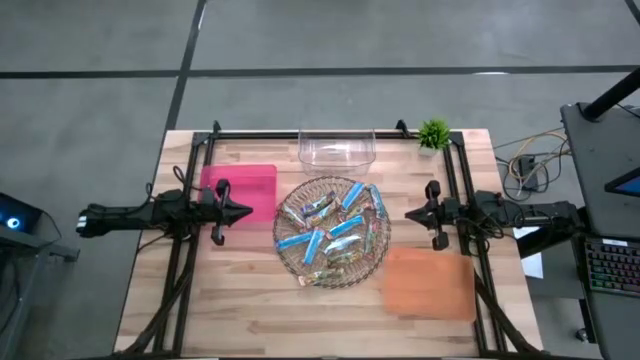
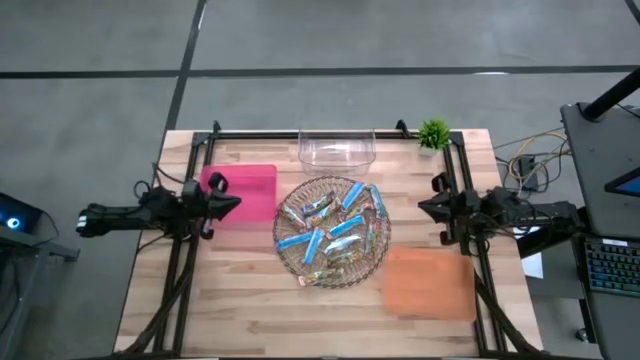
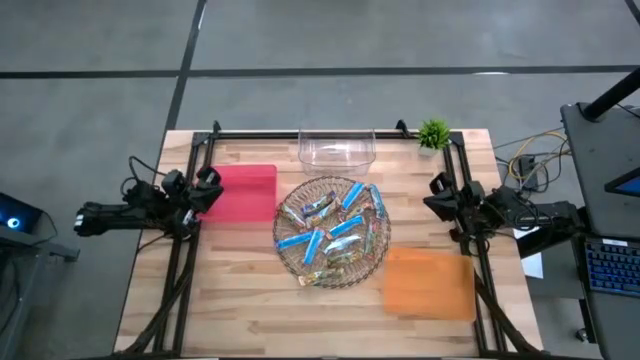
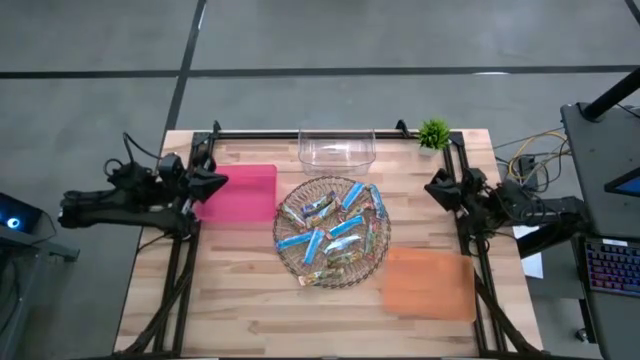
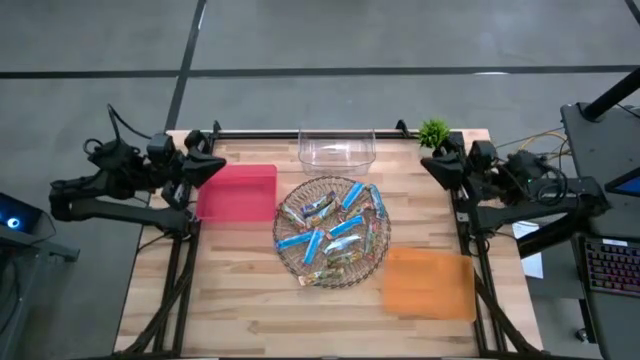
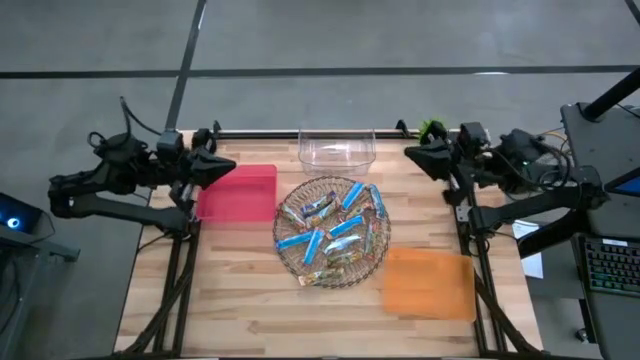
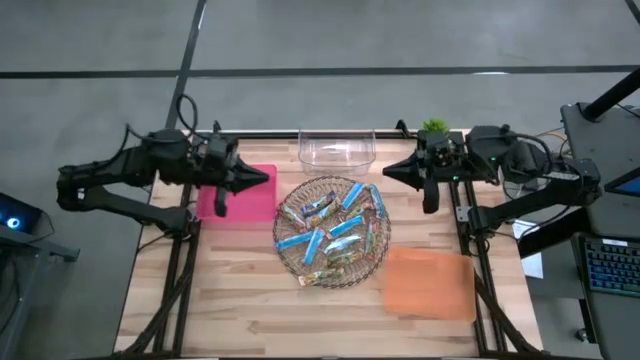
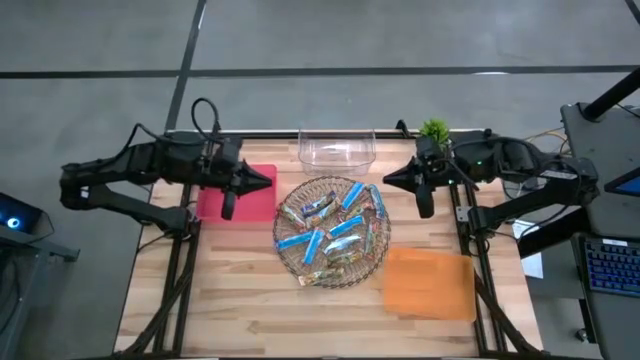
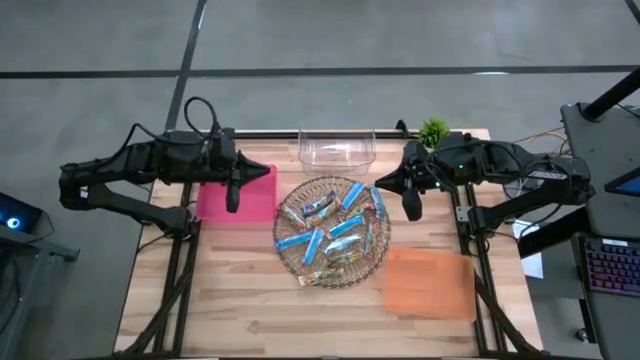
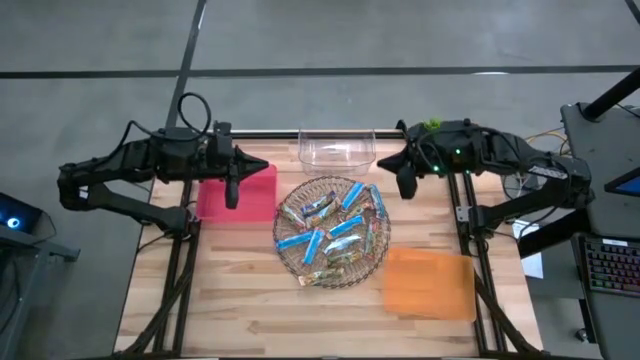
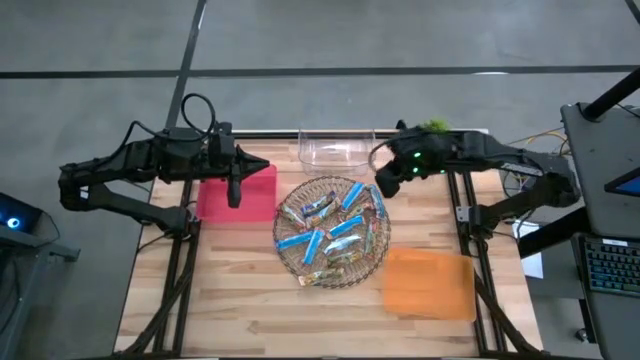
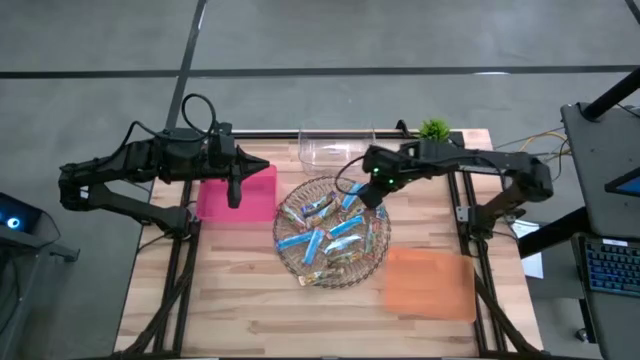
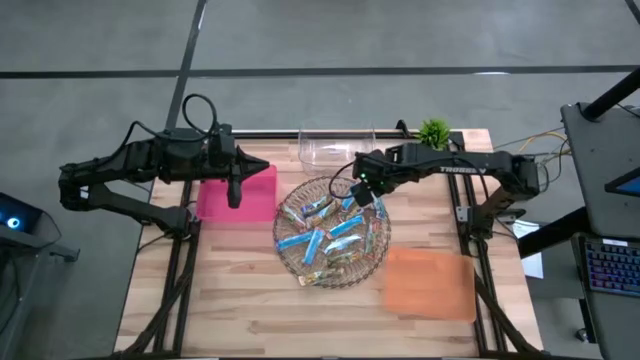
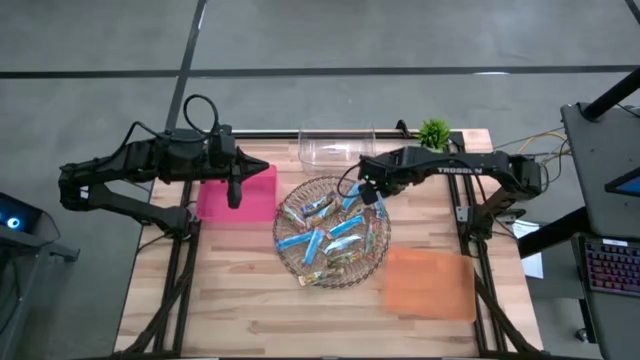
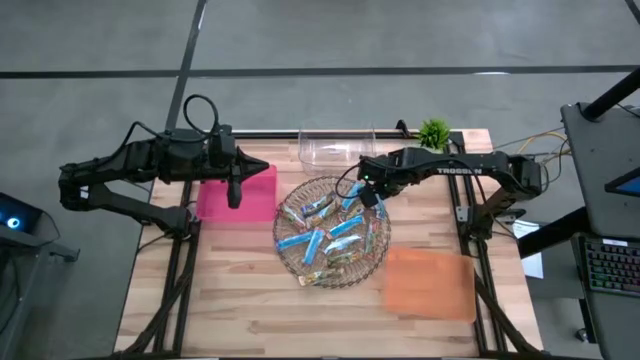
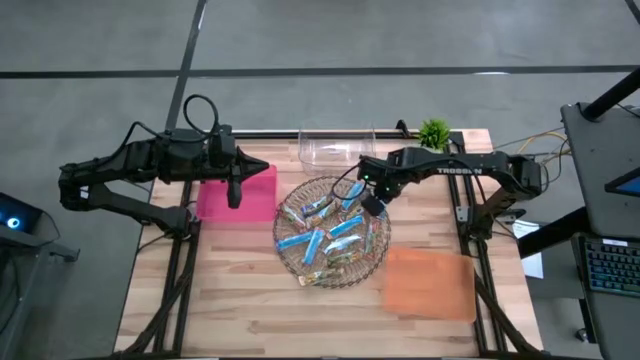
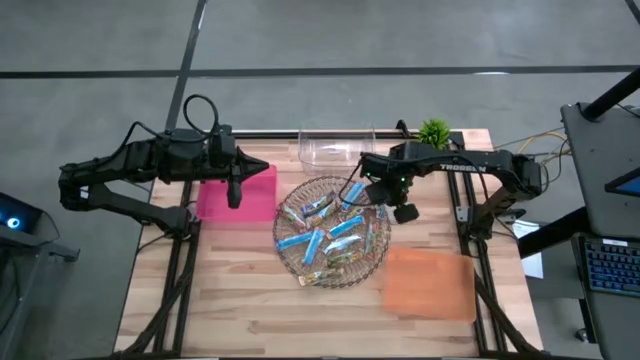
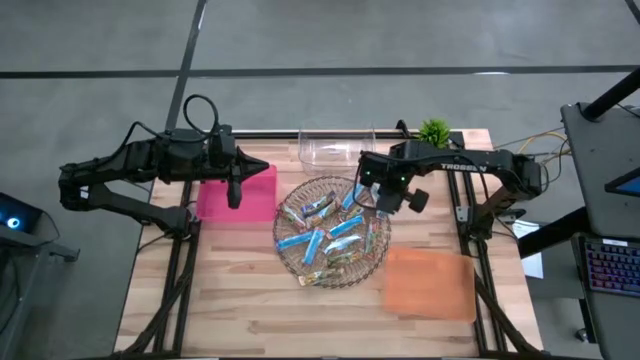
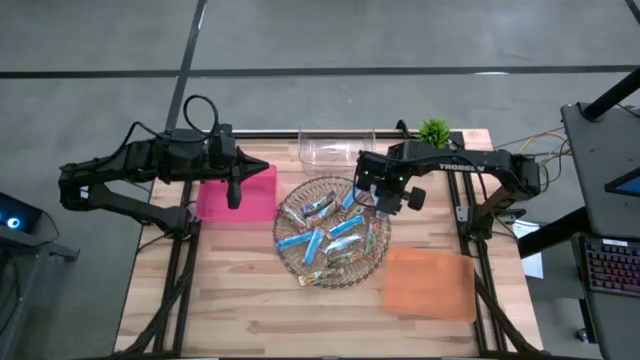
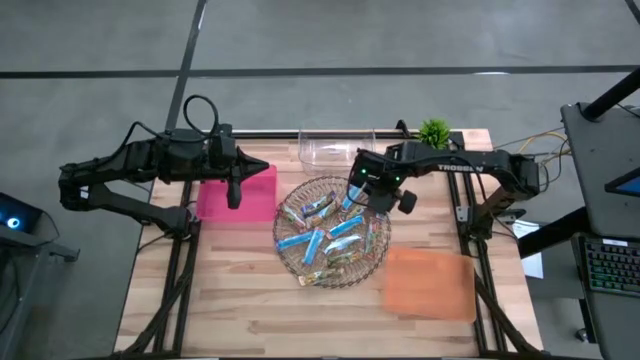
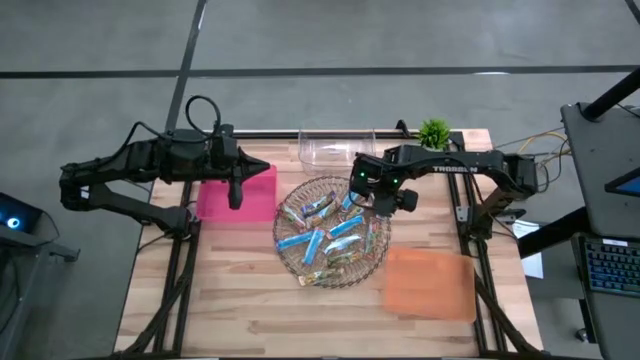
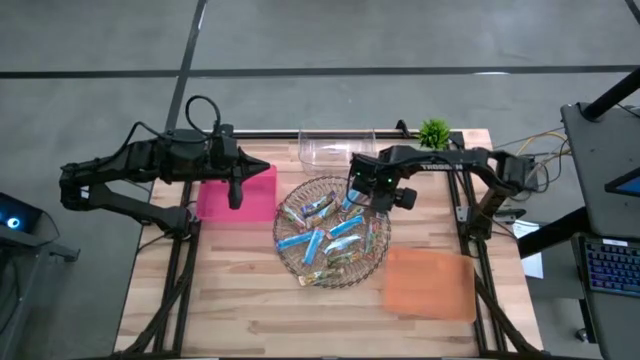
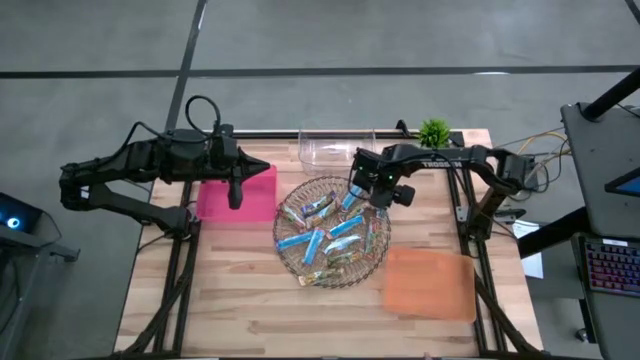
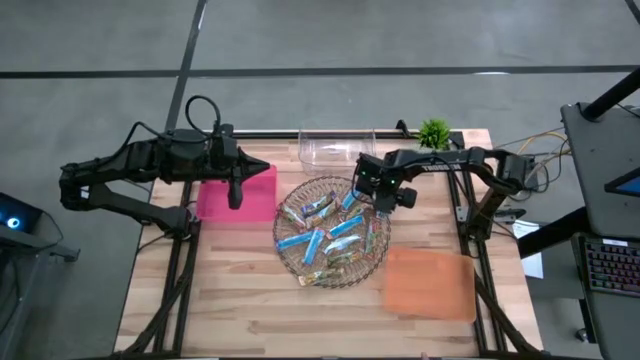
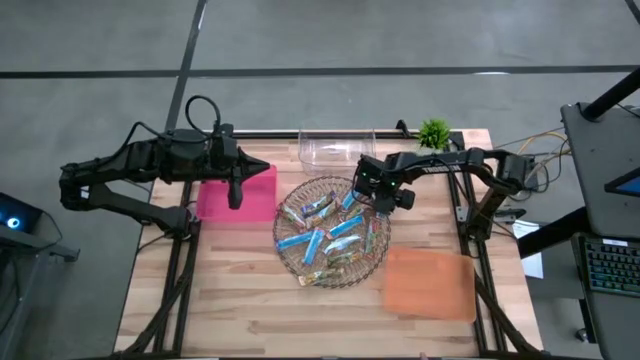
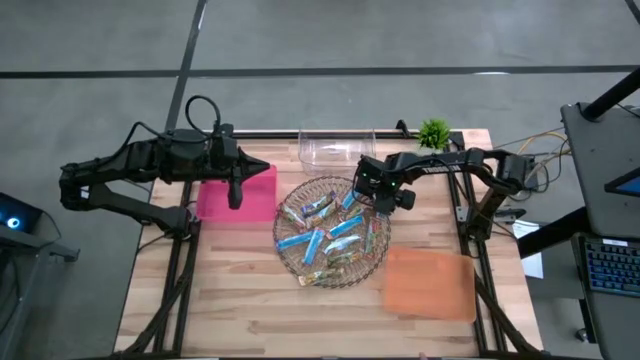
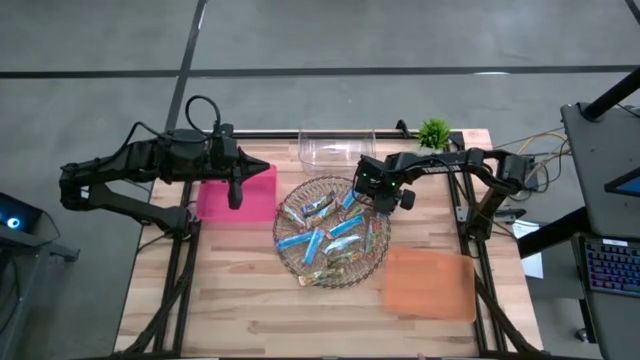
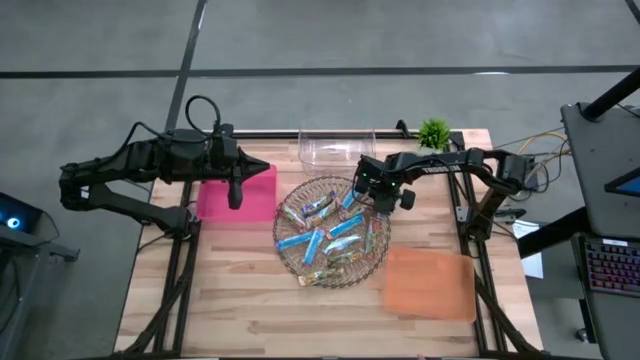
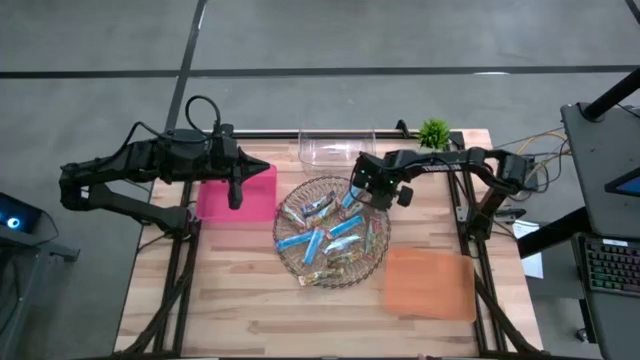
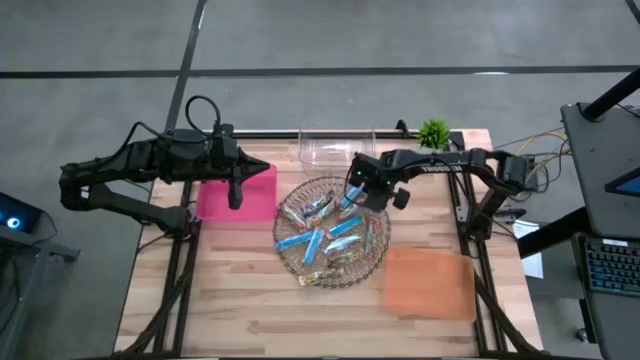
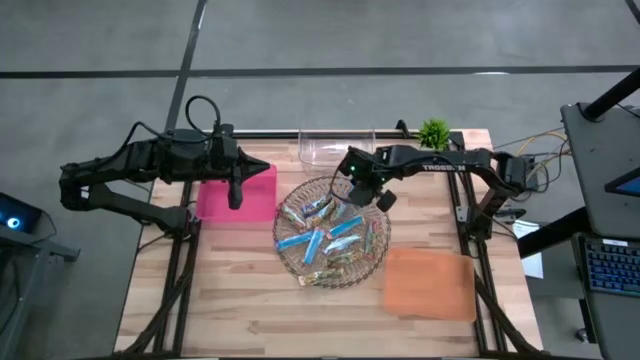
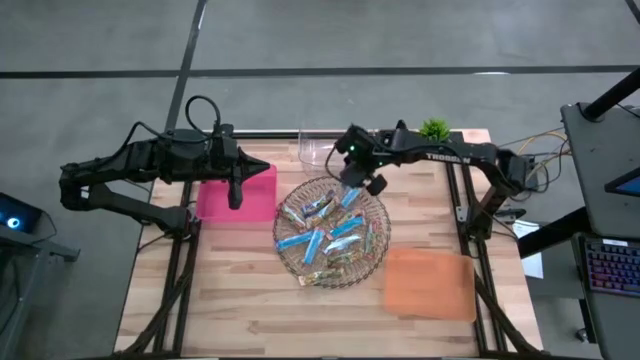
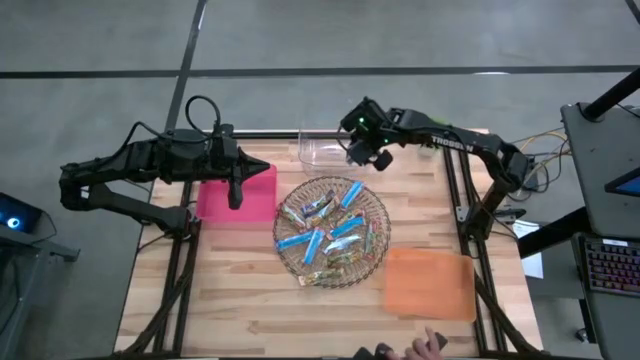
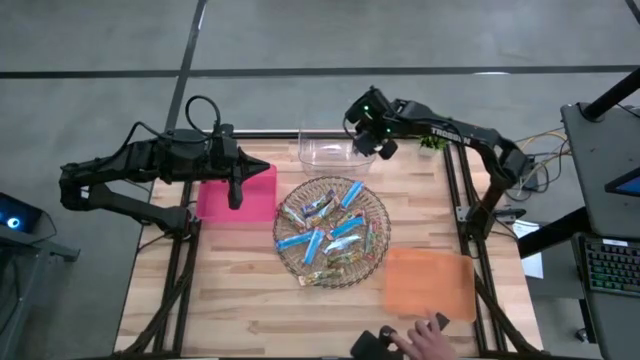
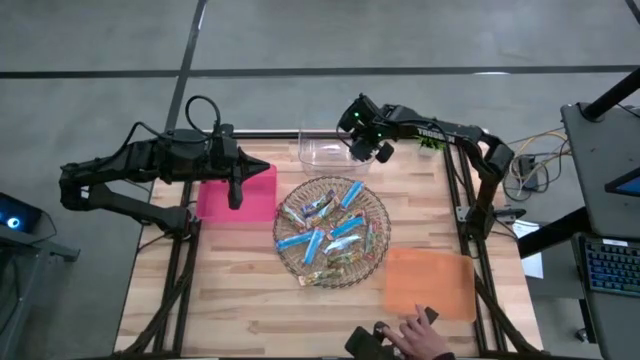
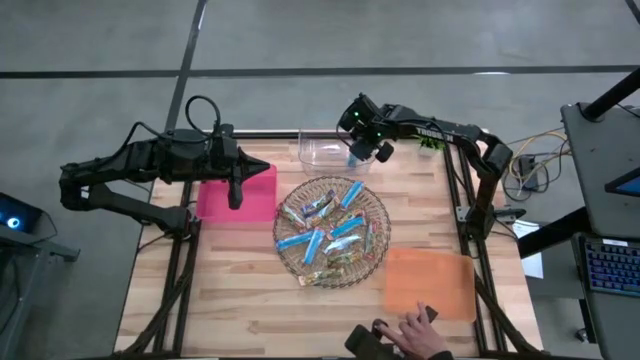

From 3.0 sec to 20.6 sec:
Task: Pick and place Granola Bars by type
Put the blue granola bar into the transparent bin

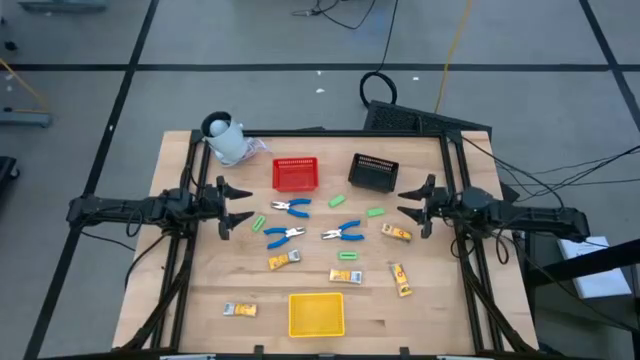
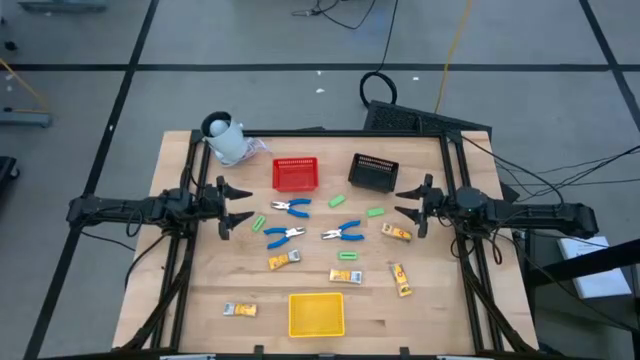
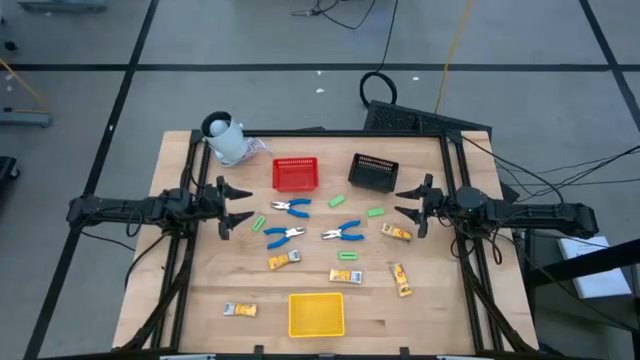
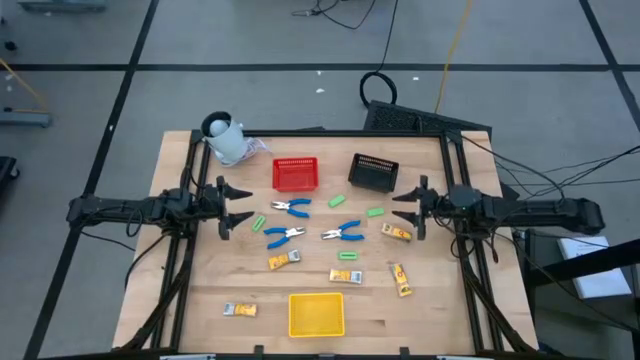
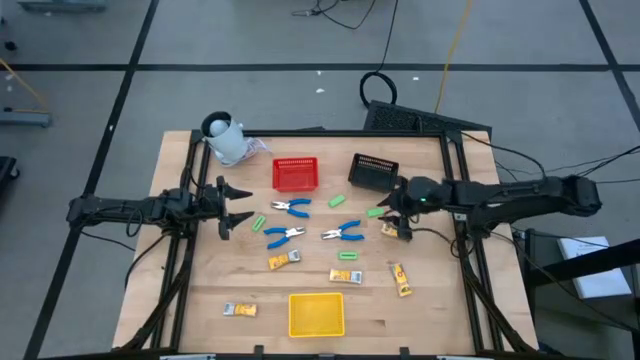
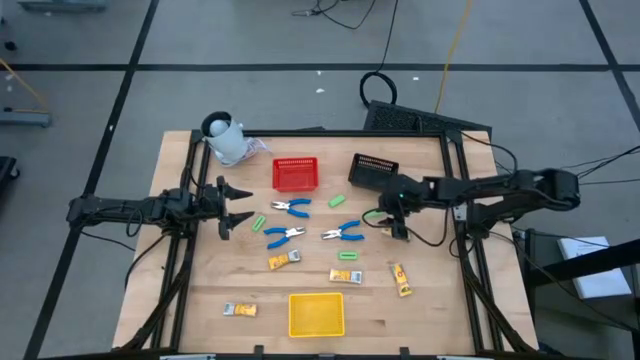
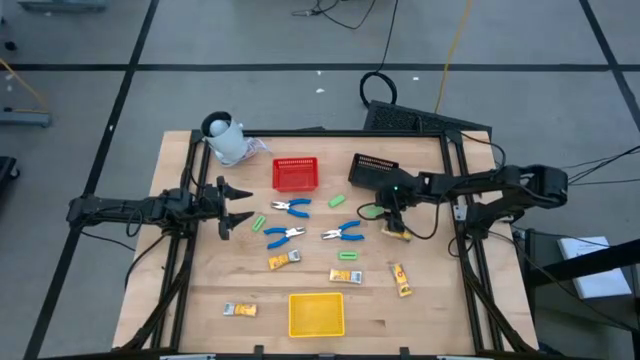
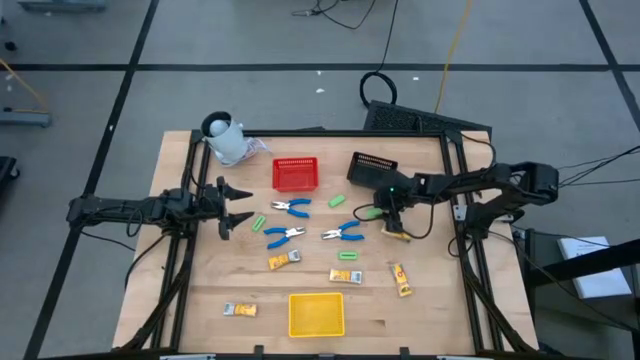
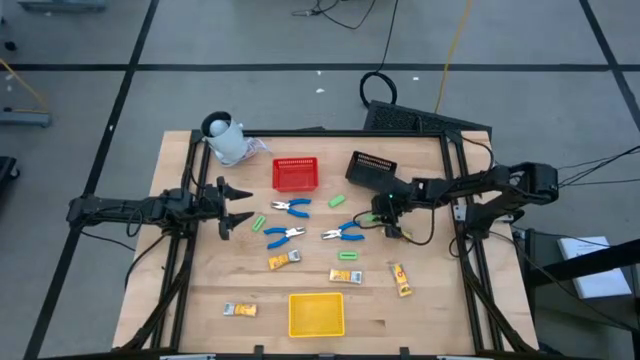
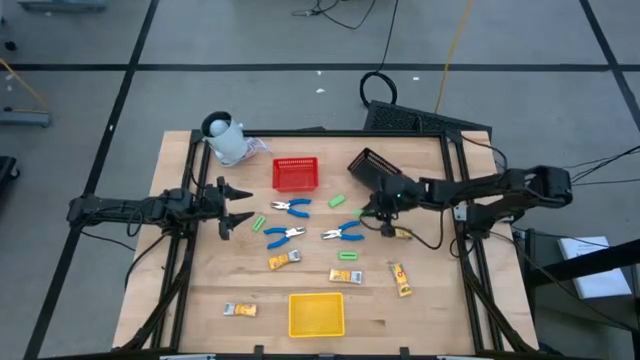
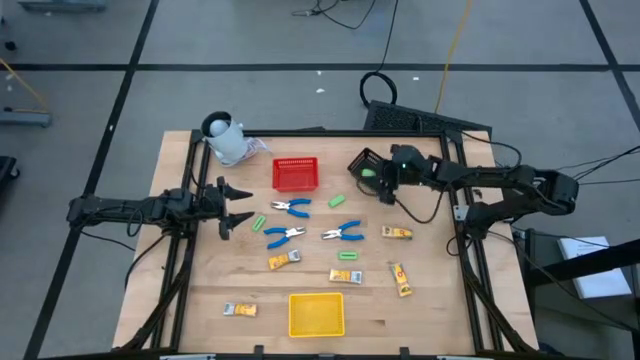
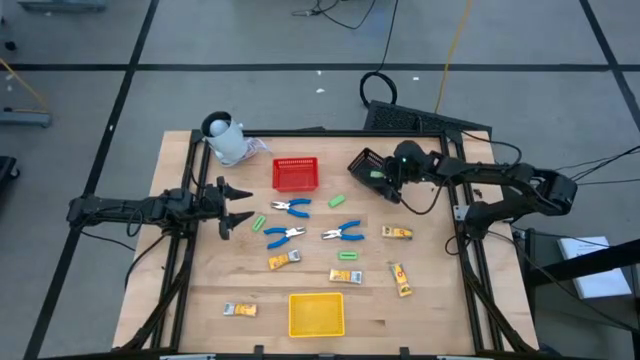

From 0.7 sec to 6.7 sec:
Task: Pick & Place School Supplies
Put the green eraser into the black bin
